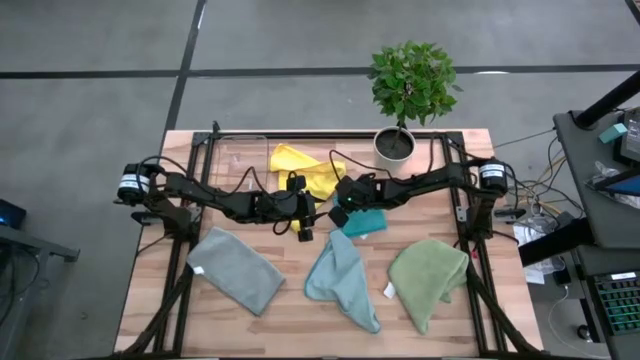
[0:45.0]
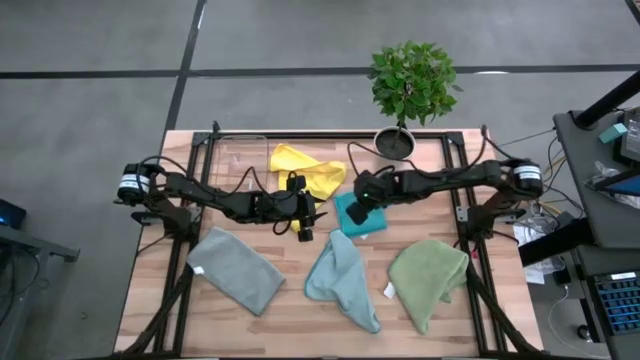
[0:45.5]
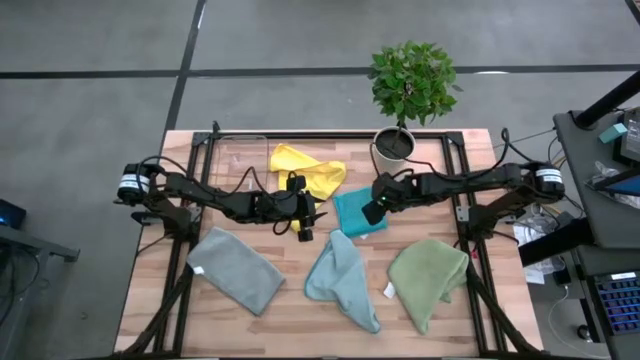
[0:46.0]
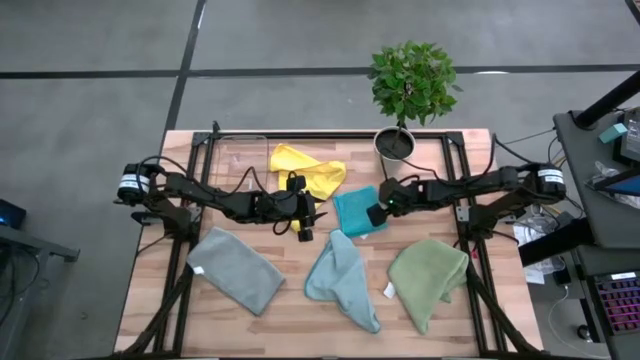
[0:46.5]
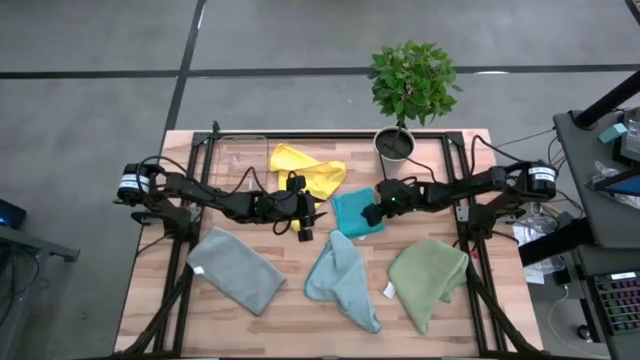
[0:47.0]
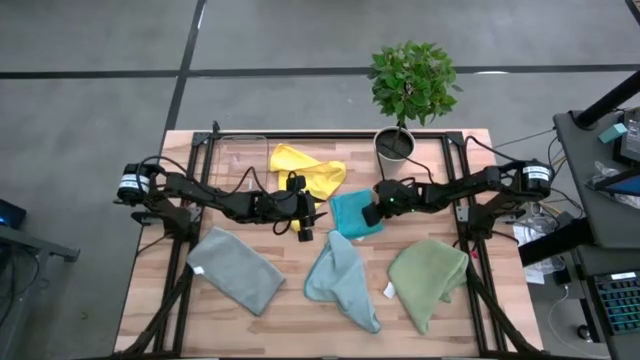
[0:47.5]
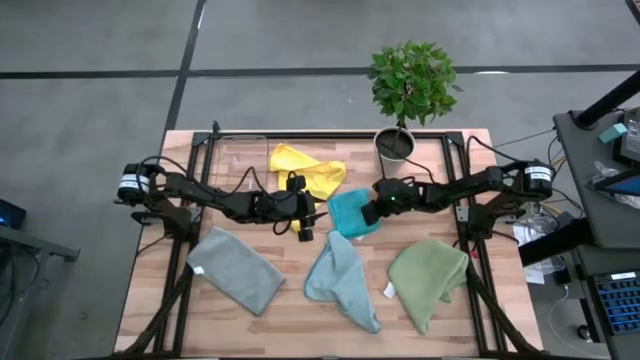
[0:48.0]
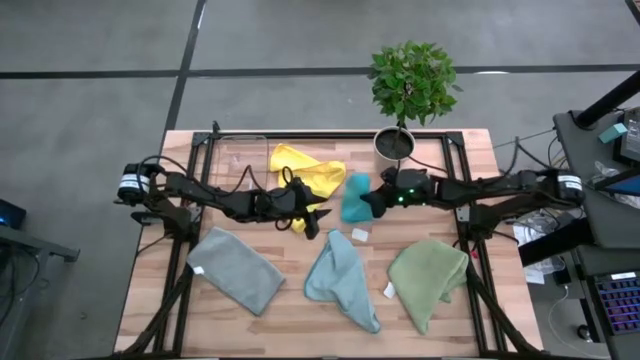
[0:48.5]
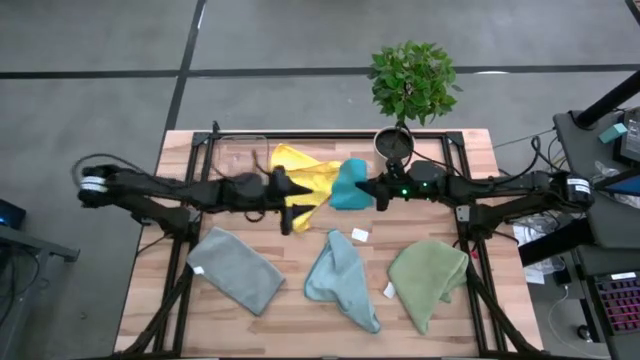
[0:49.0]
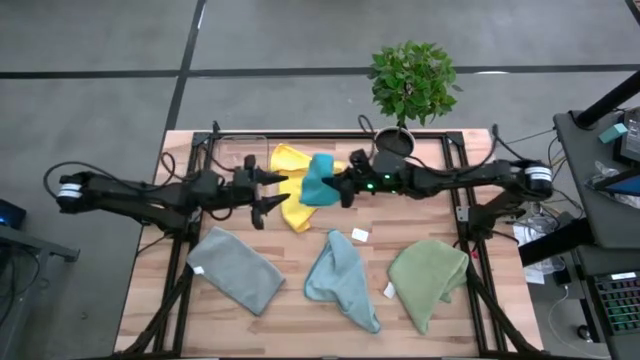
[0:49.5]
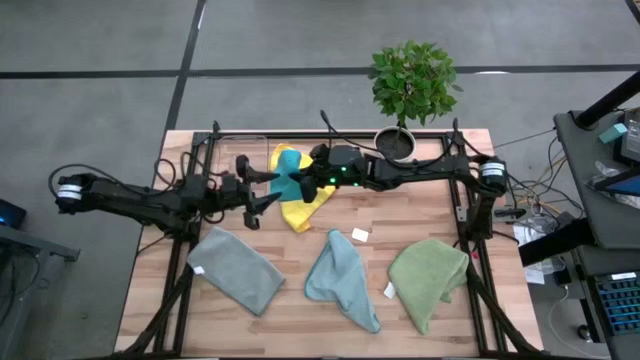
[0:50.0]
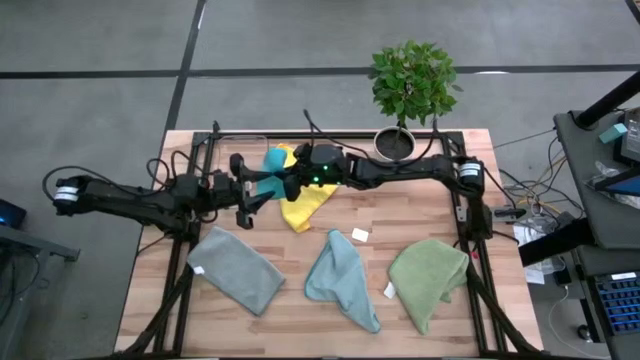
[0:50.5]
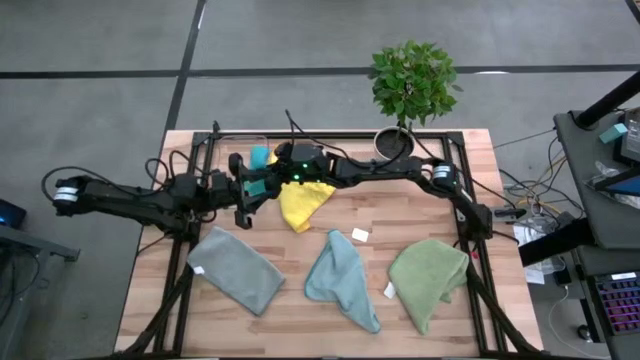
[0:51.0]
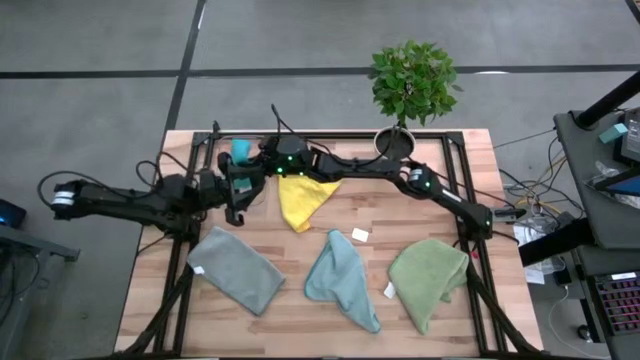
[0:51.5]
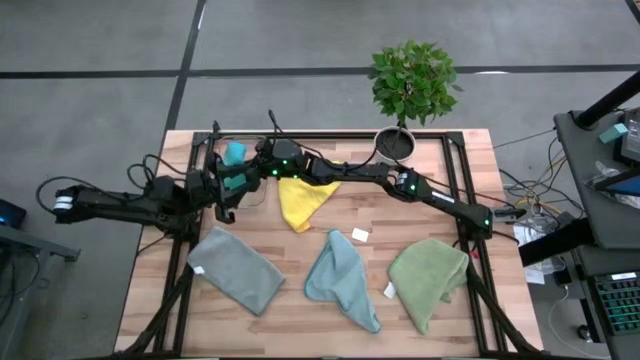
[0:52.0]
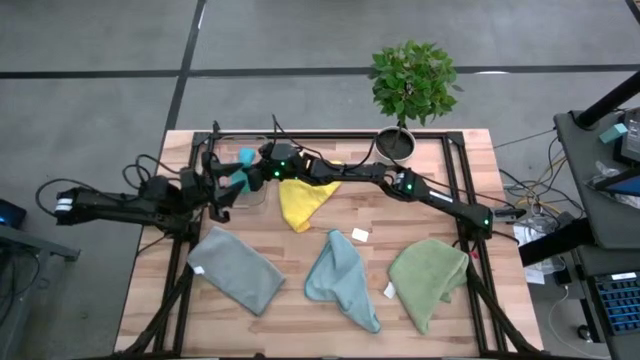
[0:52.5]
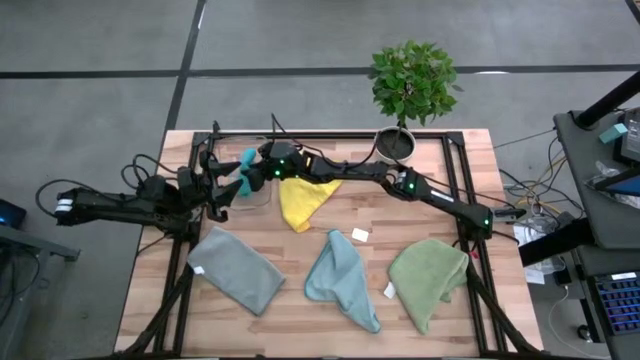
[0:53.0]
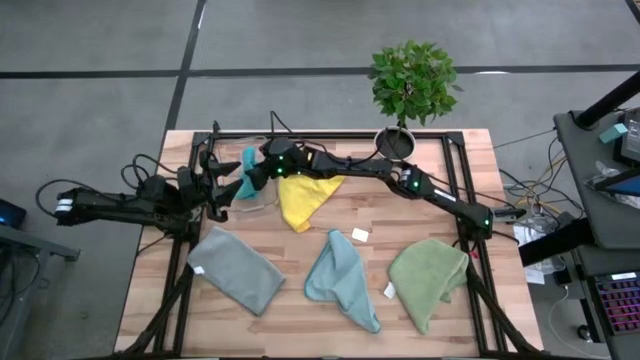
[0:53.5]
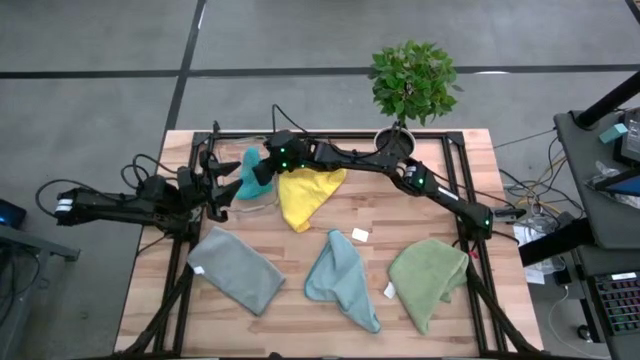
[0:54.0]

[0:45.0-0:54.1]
Task: Fold microfiber towels
Put the folded blue microfiber towel in the bin

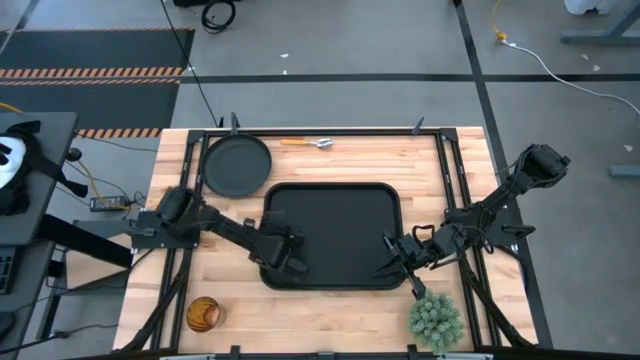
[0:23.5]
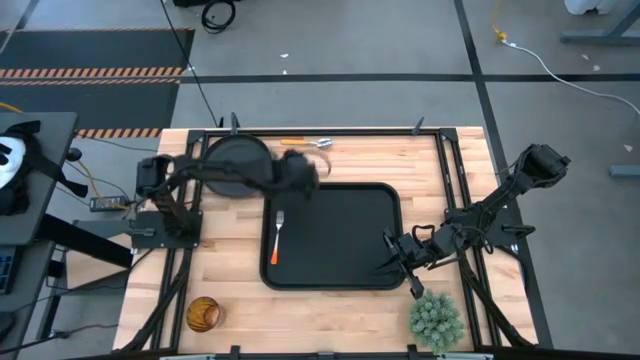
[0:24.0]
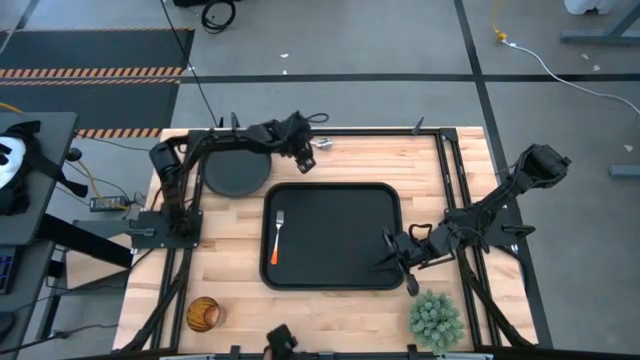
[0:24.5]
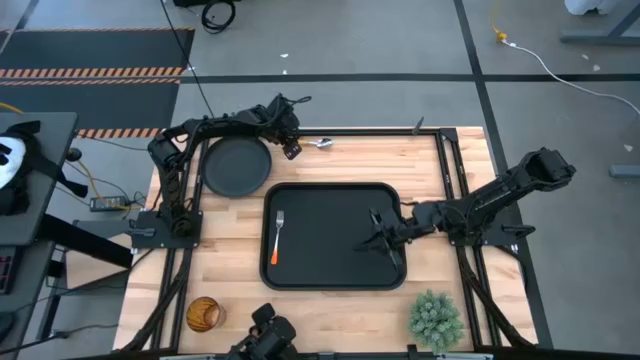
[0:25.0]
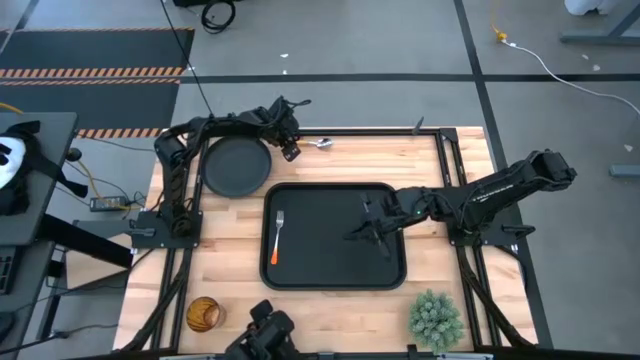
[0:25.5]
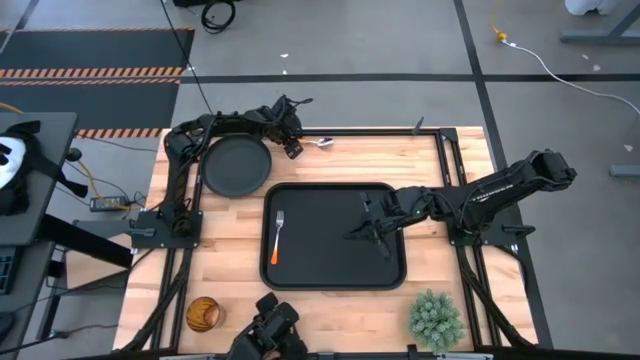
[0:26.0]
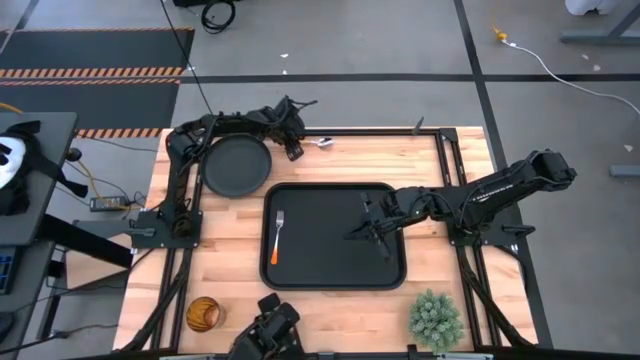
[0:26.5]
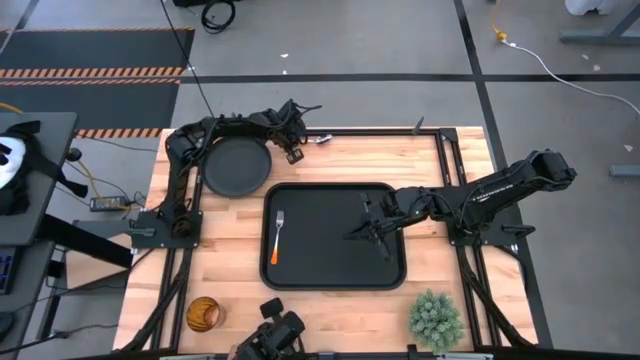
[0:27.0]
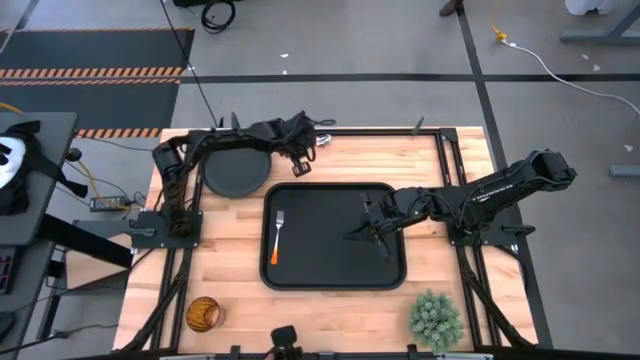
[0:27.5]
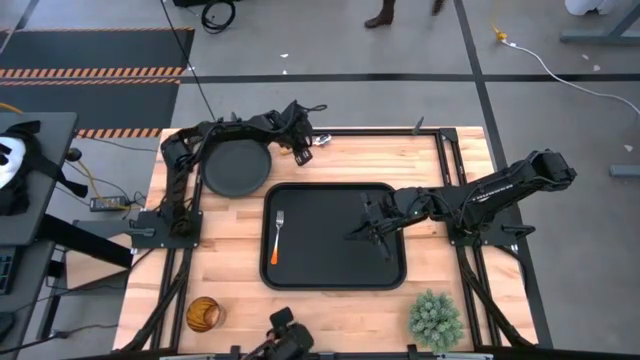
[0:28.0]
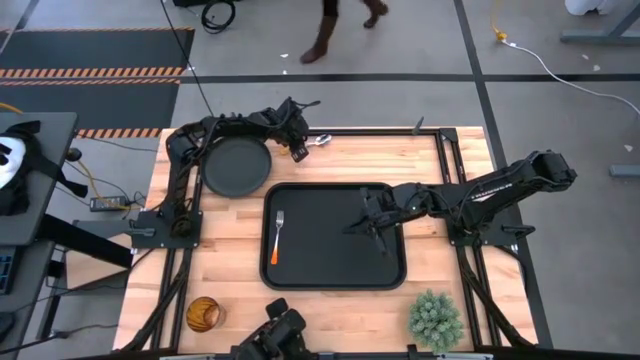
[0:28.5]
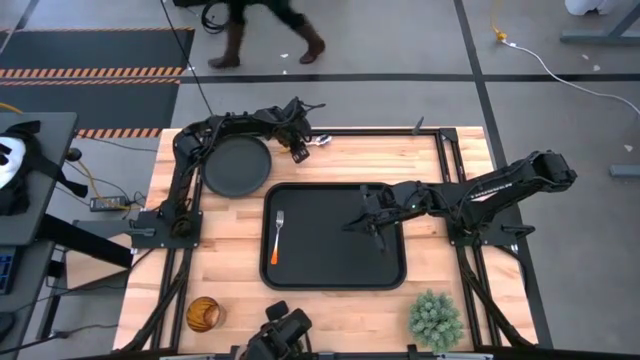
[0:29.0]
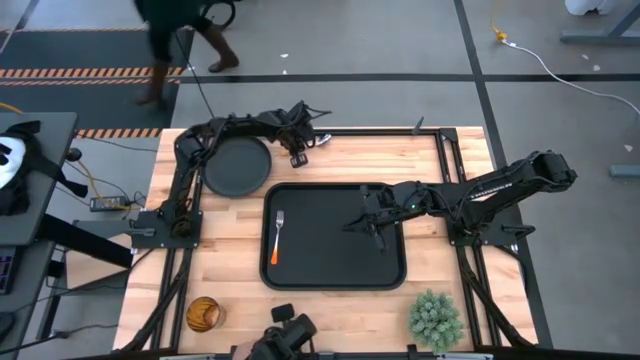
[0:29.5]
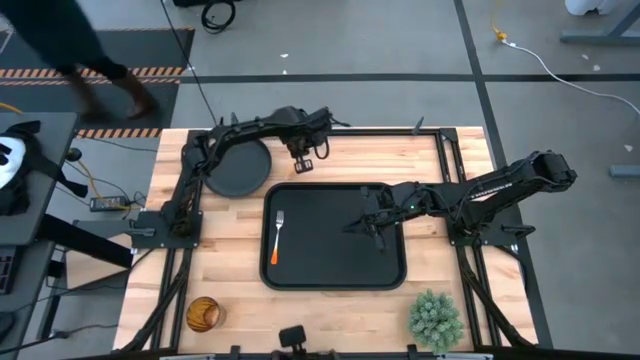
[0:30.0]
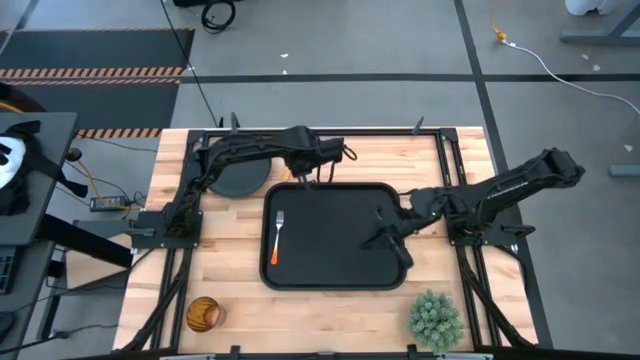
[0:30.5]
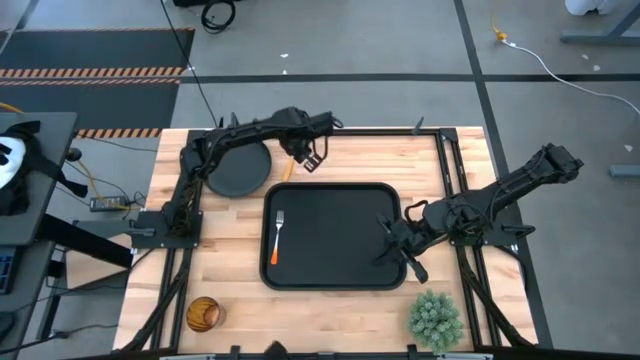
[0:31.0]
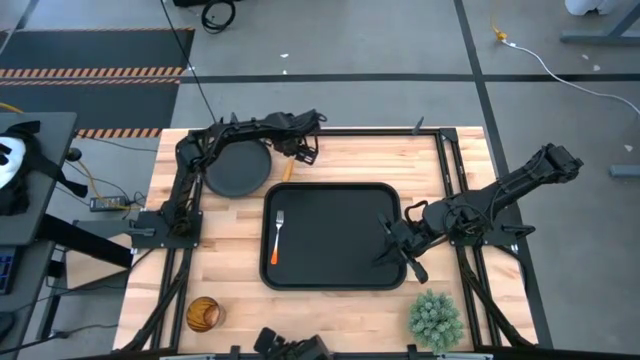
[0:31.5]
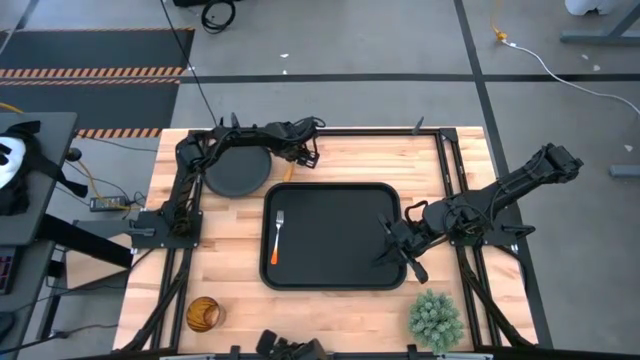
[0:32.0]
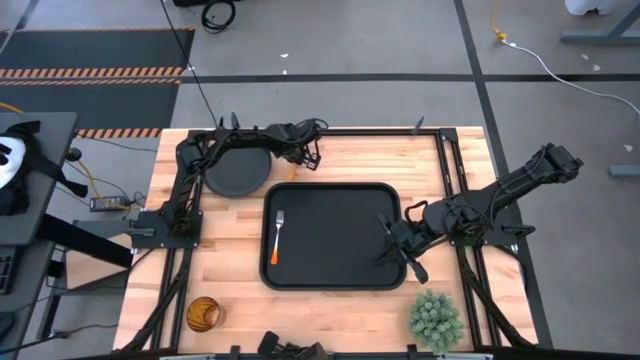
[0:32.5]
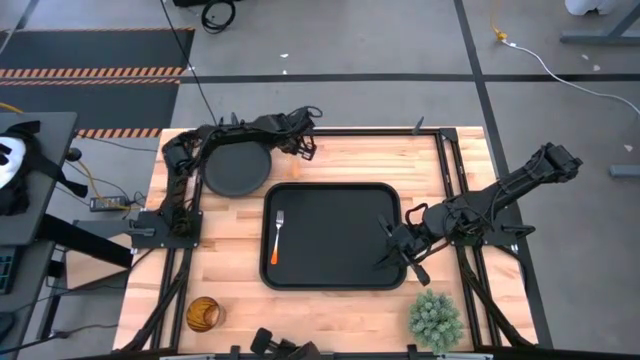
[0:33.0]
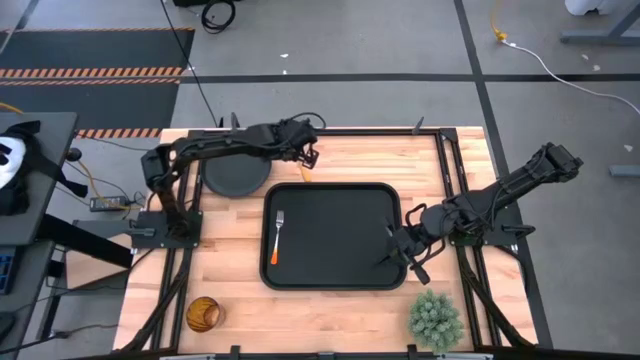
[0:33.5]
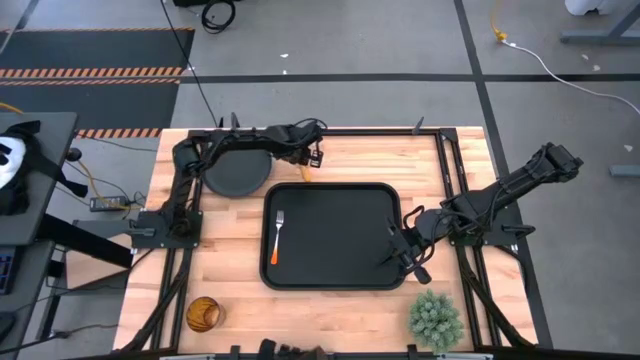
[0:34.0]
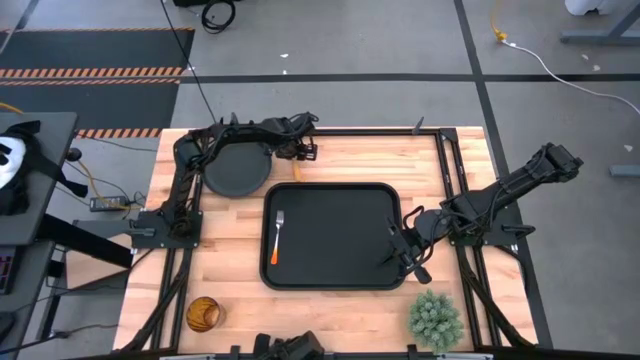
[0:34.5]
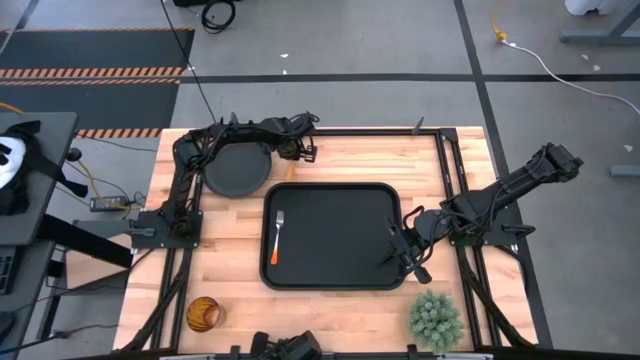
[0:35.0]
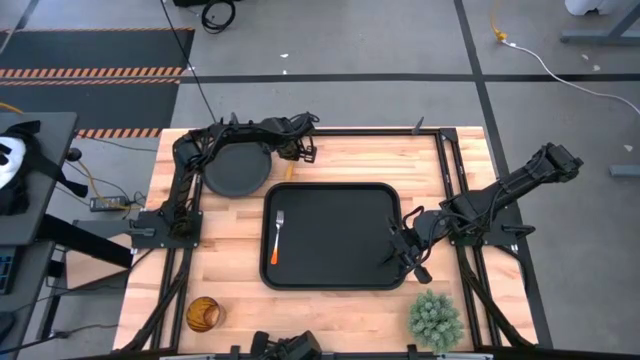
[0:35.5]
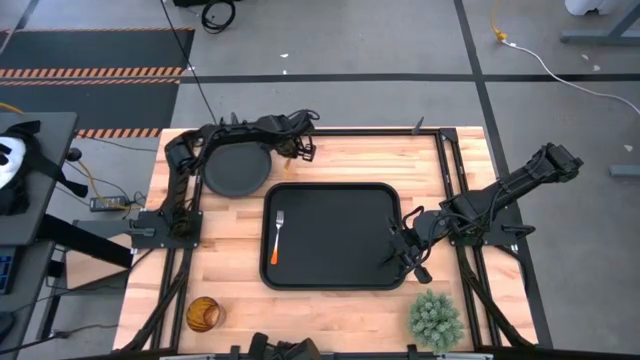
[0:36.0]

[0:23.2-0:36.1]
Task: Pick and place plate/cup/fork/spoon on tray
Put the yellow spoon on the black tray to the right of the orange fork
